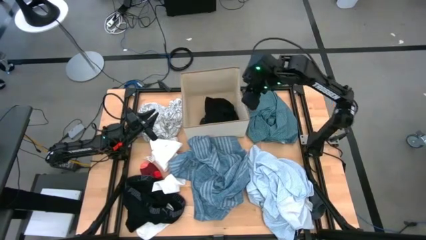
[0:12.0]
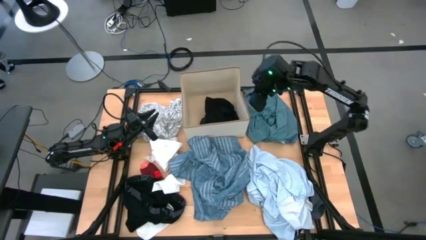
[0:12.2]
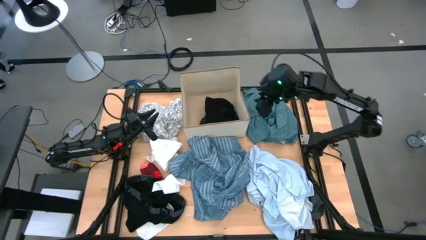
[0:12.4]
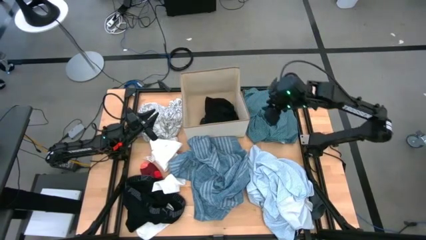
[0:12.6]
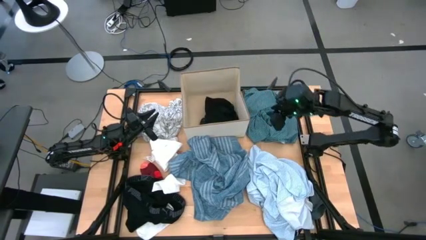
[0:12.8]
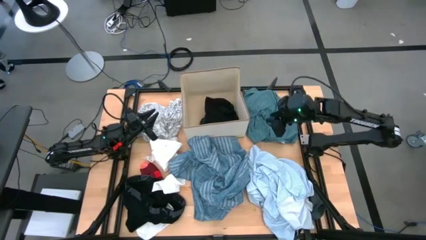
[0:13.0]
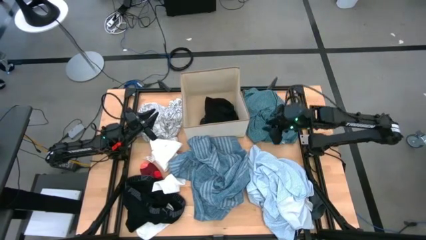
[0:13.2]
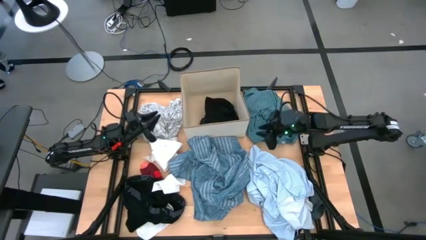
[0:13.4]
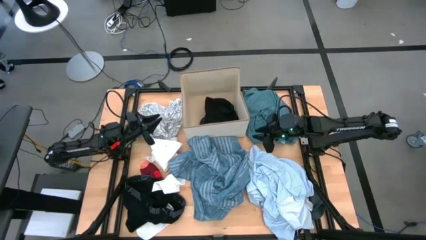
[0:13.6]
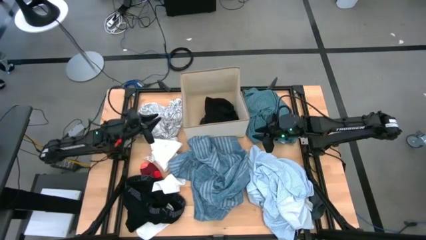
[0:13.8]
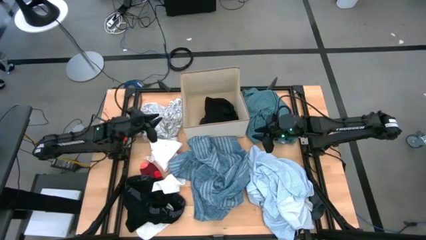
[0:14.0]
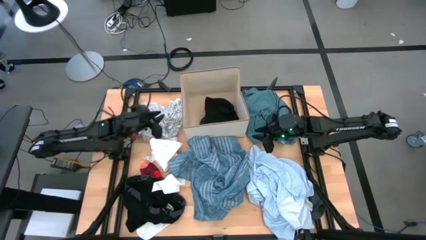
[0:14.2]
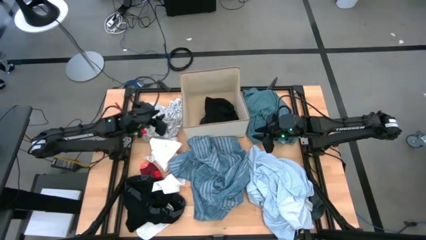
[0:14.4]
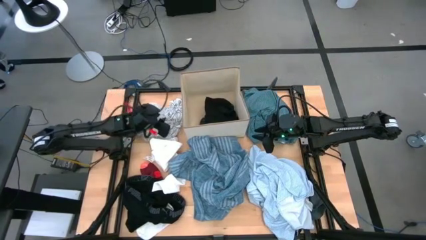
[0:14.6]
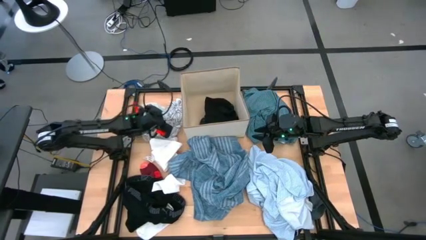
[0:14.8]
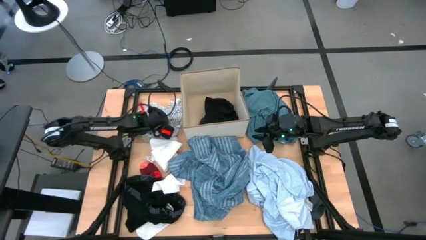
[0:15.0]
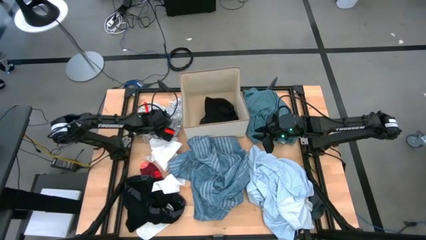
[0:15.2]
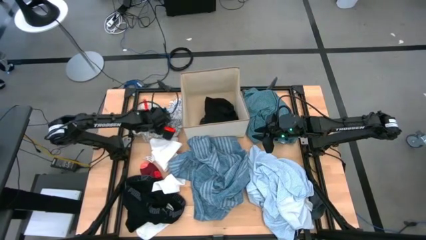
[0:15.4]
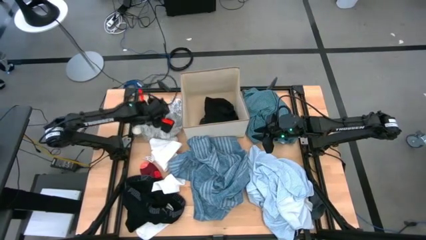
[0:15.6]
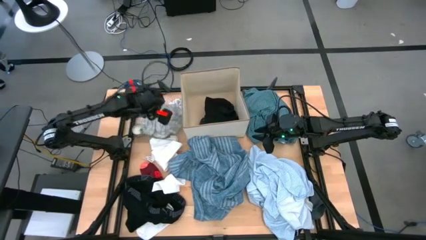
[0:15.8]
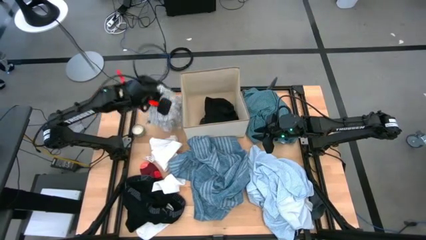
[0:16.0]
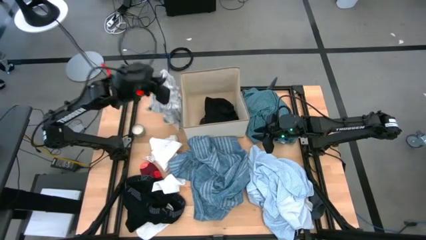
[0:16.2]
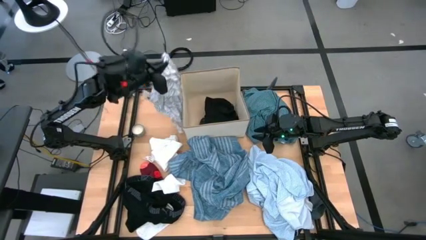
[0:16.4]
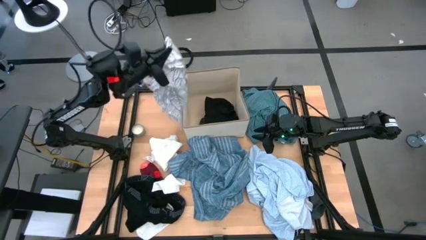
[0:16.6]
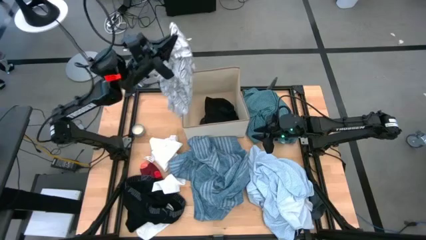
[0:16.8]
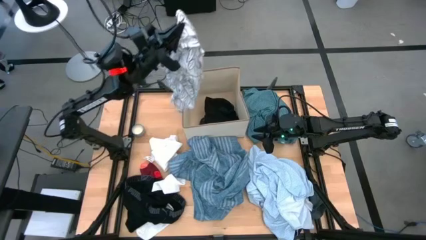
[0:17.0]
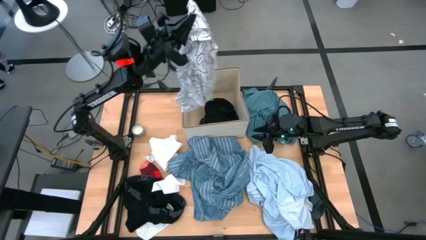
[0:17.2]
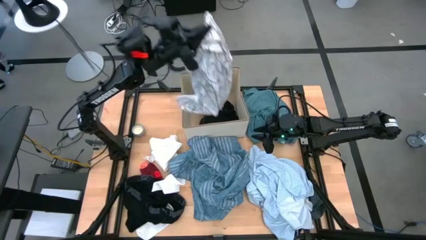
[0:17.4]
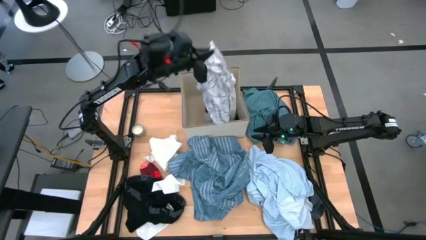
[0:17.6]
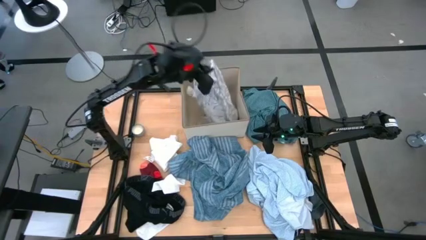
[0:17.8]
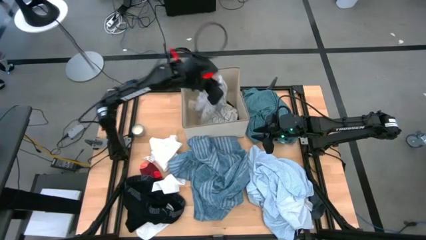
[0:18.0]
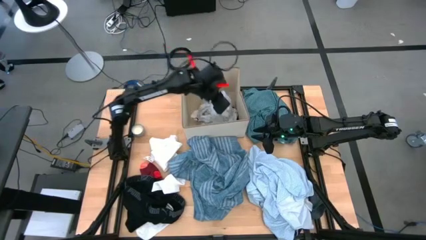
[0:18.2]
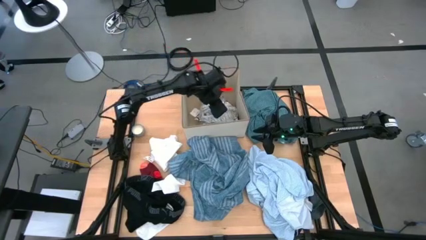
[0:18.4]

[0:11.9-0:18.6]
Task: Sort clothes
Put the white patterned cloth into the laundry bin

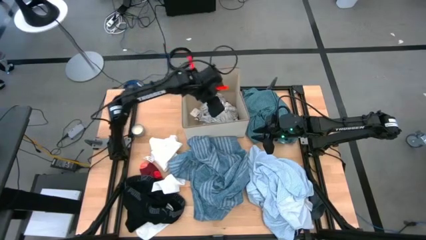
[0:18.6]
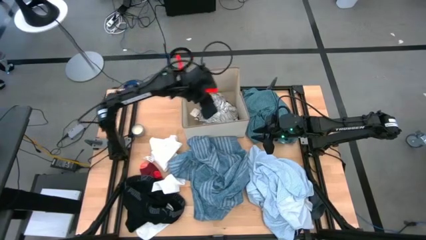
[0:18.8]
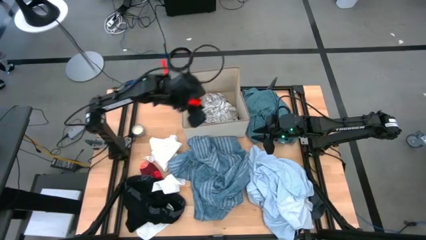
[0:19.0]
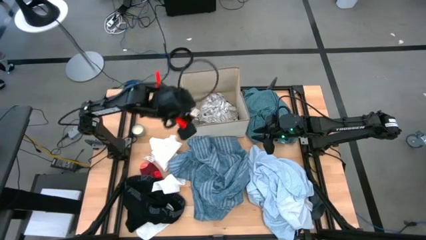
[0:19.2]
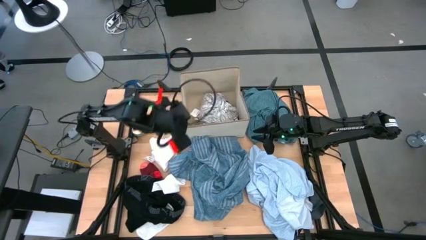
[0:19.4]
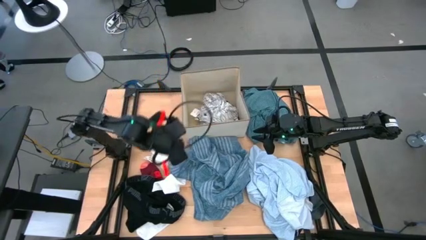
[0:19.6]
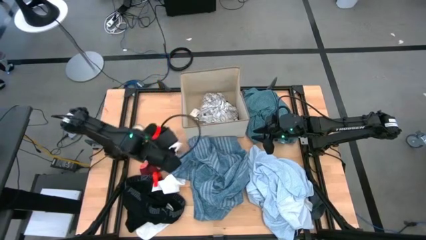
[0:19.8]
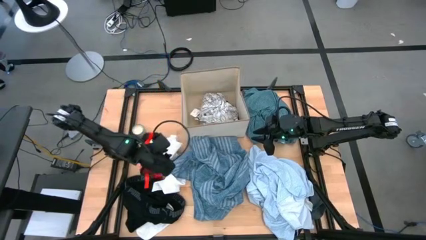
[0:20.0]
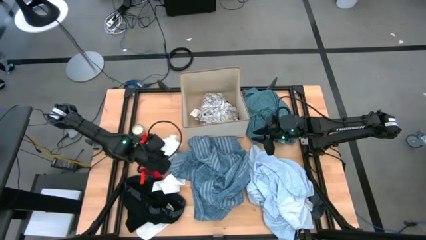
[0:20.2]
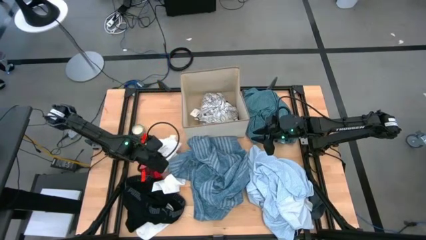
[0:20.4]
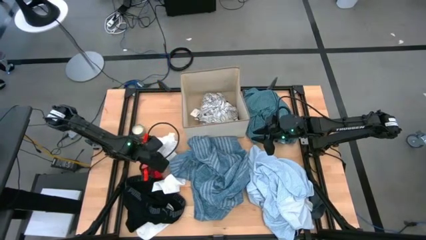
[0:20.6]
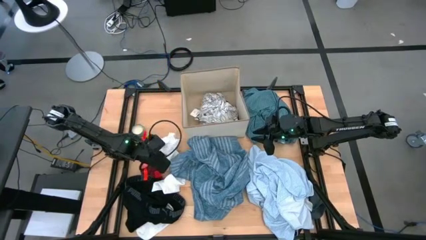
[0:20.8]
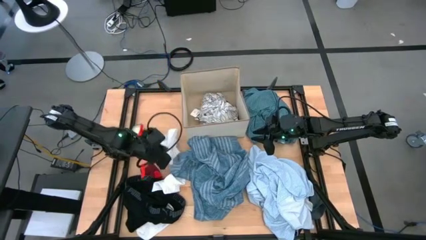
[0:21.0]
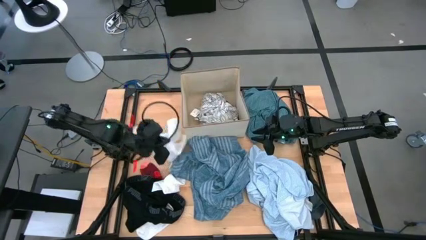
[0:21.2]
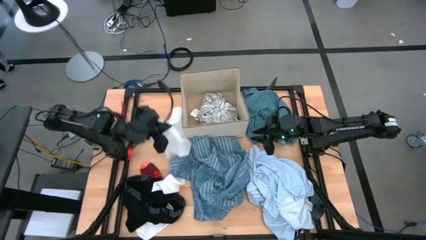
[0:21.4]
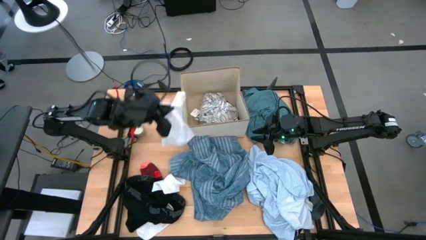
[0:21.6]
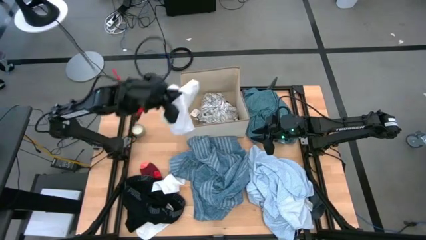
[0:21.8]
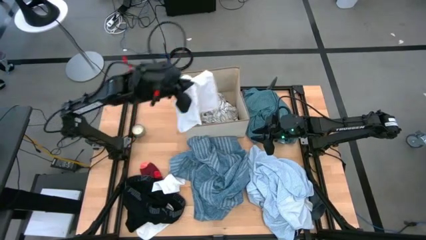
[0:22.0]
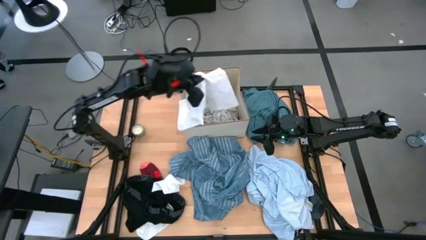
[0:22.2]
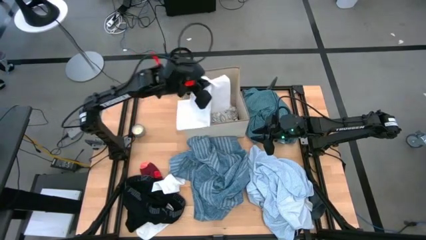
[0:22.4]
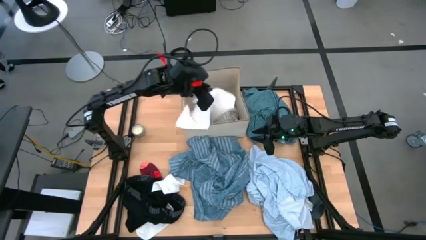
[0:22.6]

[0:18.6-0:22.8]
Put the white shorts into the laundry bin

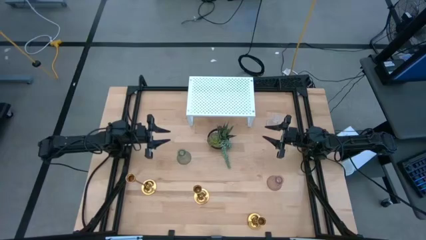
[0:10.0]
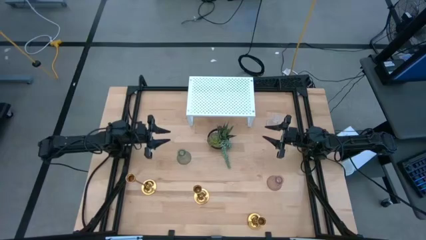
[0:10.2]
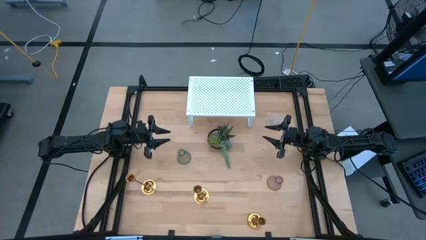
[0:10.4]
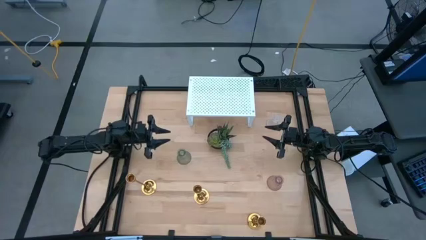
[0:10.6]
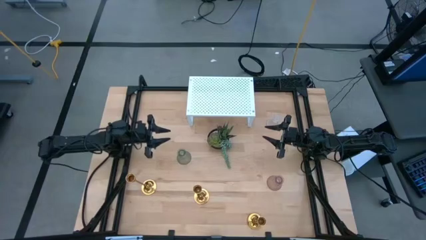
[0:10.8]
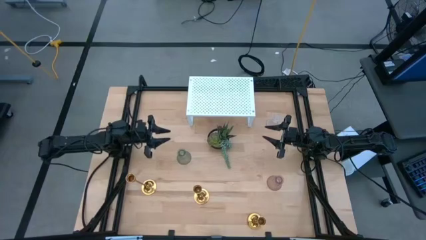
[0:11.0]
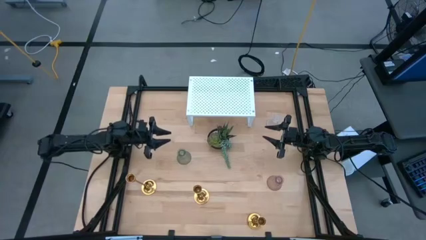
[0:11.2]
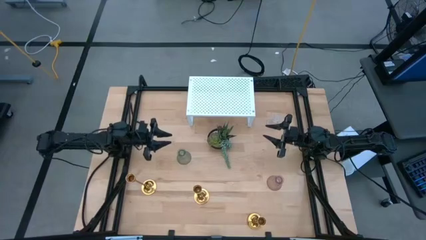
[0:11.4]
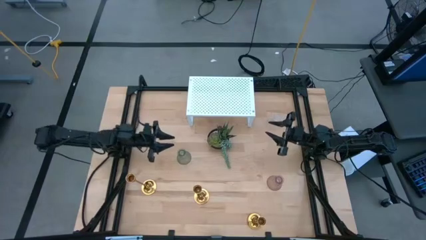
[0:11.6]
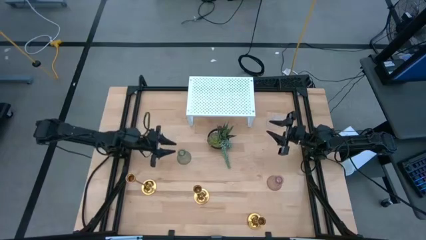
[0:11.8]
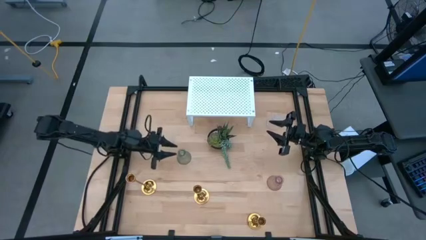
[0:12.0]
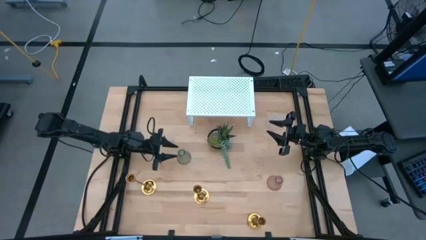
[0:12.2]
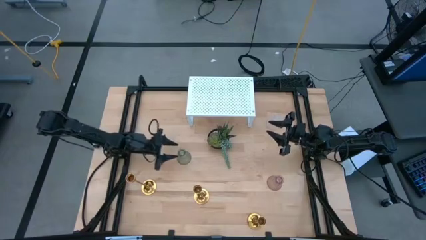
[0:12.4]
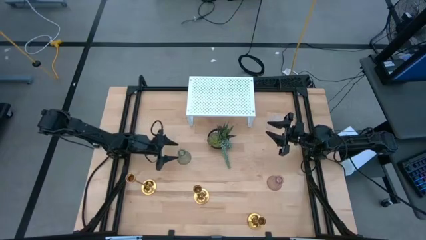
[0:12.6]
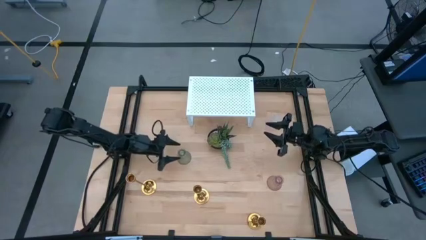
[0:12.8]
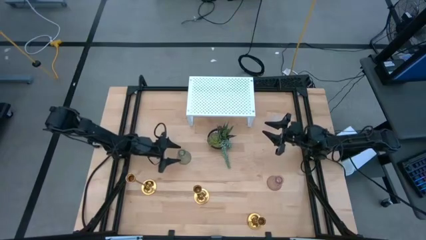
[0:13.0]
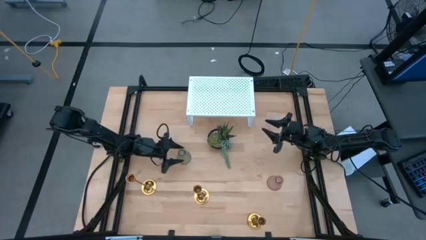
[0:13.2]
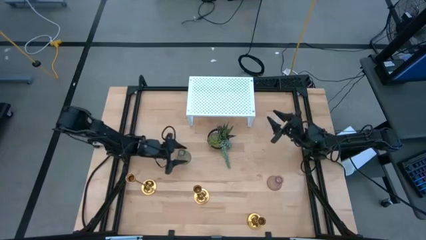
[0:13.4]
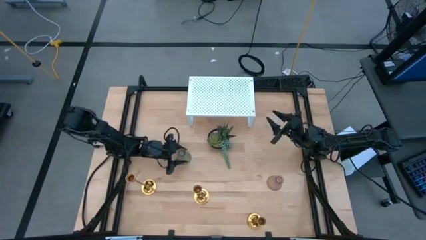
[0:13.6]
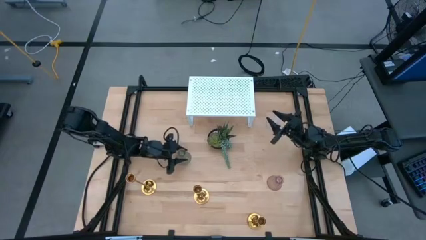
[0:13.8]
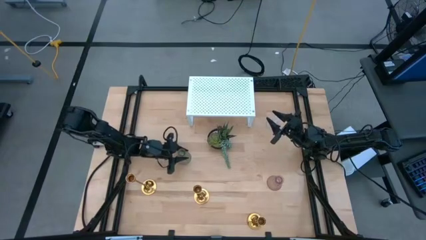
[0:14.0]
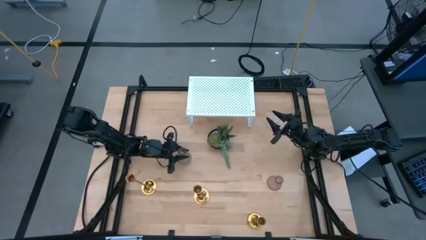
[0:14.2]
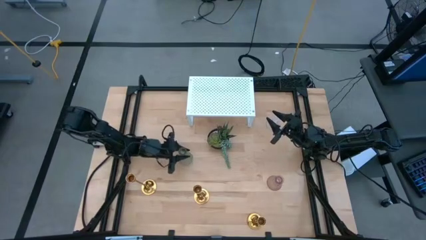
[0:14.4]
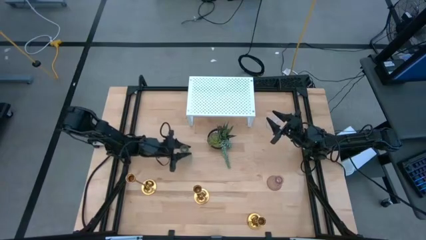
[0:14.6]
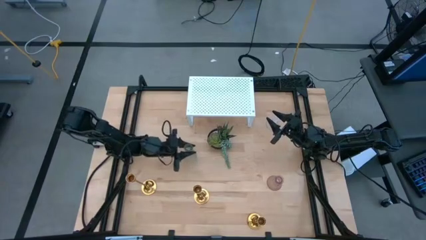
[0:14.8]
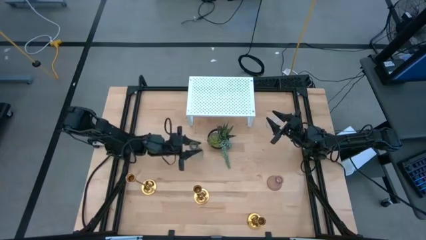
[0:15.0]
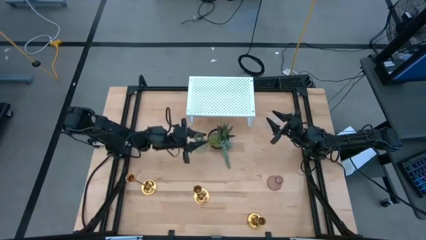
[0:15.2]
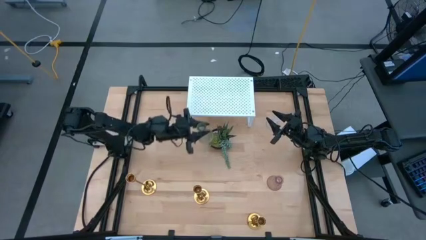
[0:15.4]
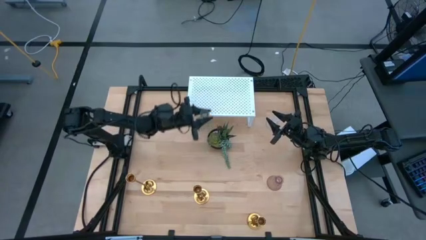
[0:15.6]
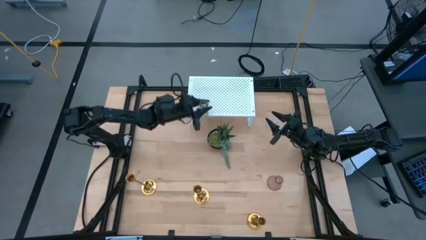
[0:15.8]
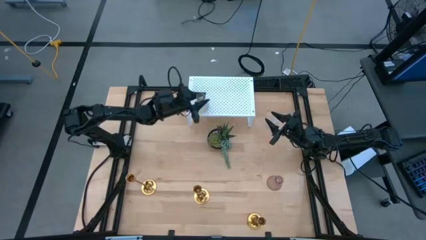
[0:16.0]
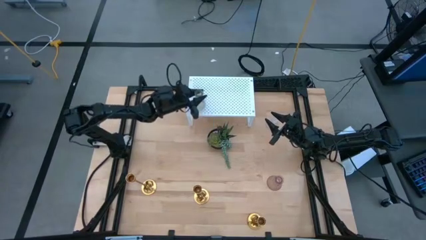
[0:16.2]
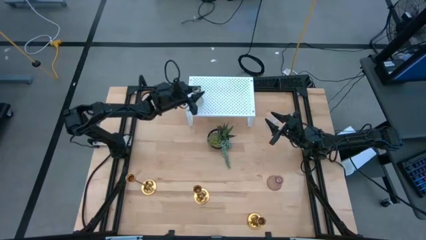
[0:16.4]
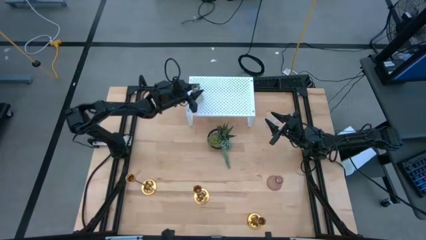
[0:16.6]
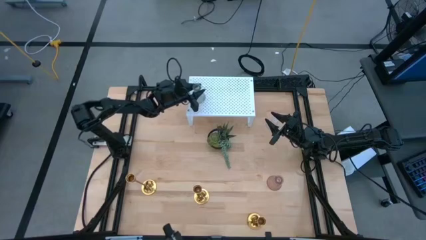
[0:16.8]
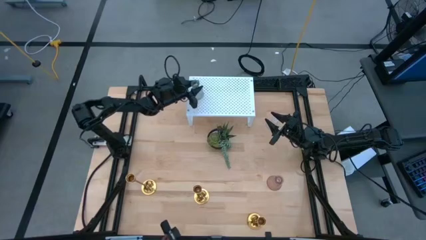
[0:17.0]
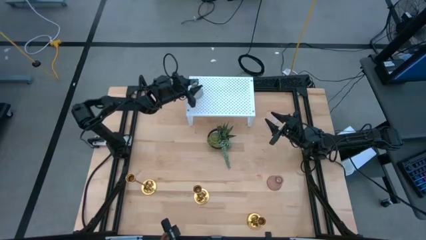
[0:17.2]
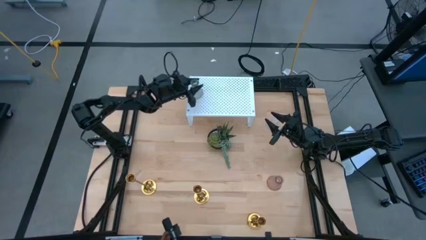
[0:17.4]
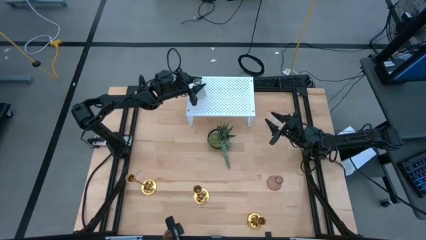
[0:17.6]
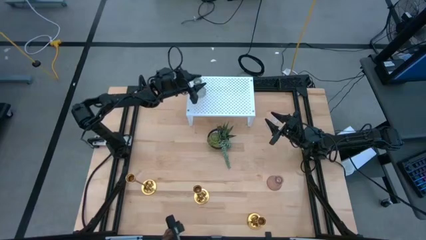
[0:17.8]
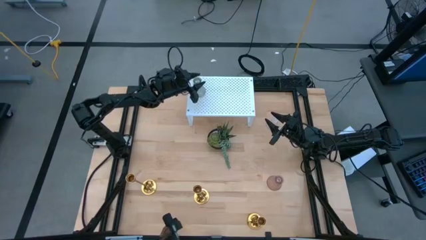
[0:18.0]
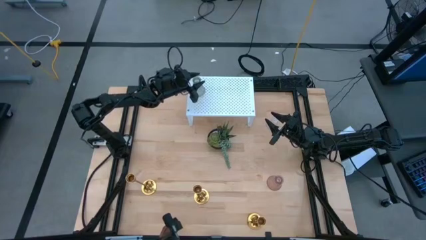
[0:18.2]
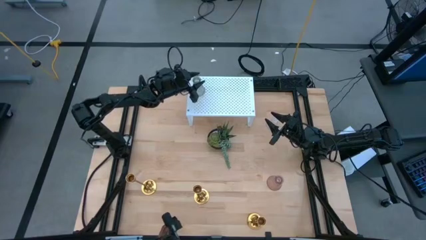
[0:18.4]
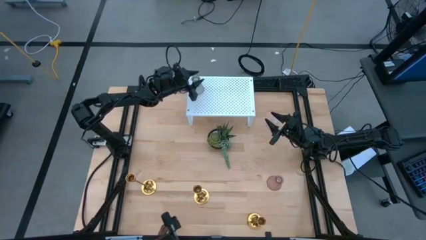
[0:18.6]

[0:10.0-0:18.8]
Task: Pick & Place candle stick holders
Put the green glass candle holder on the shelf
